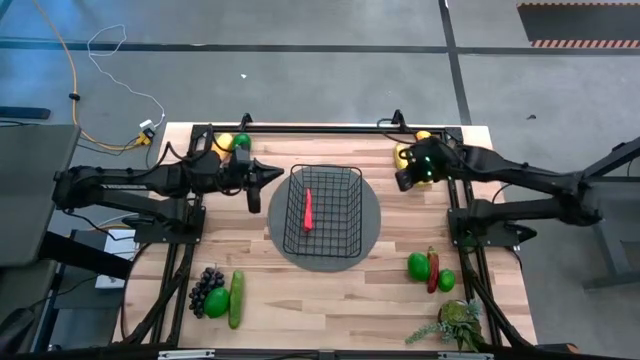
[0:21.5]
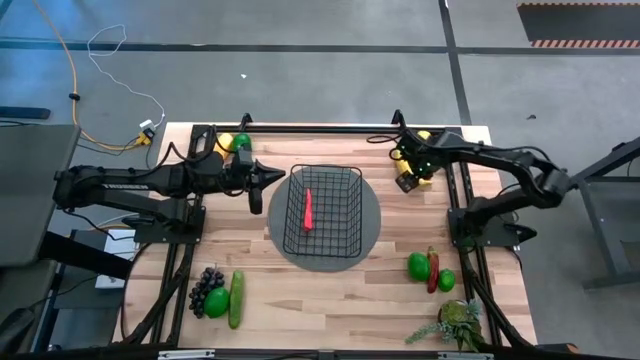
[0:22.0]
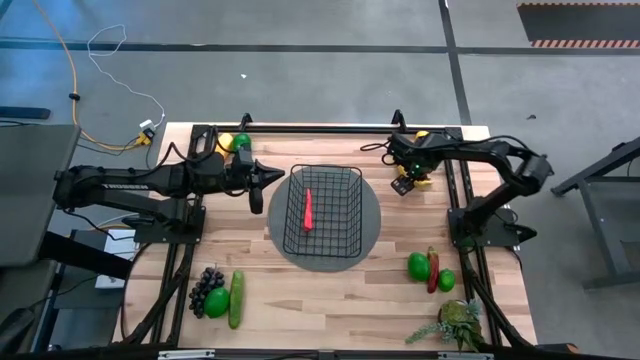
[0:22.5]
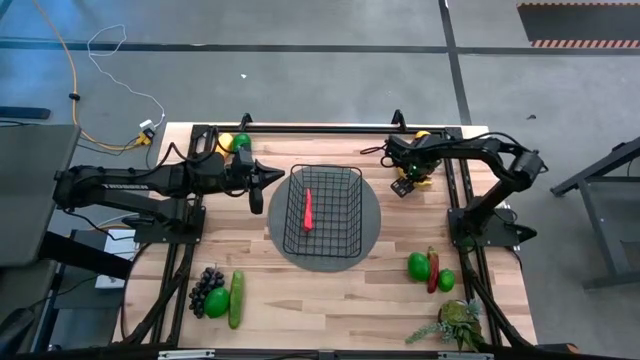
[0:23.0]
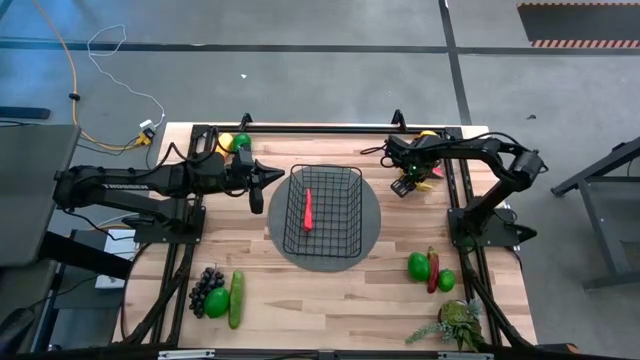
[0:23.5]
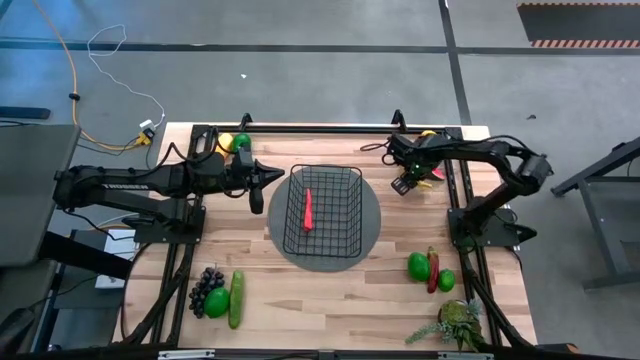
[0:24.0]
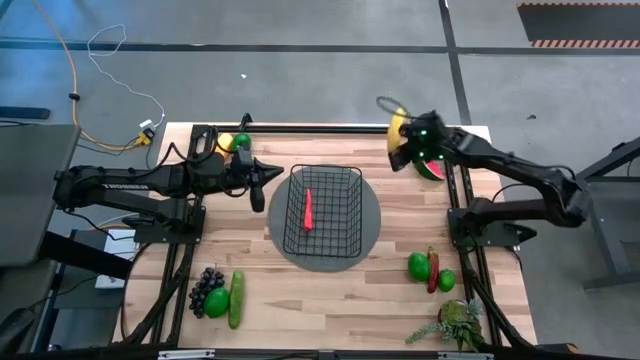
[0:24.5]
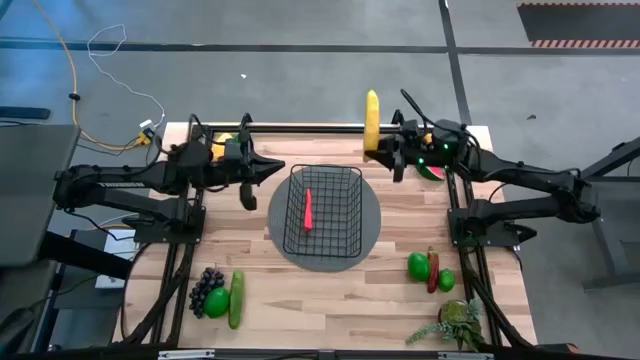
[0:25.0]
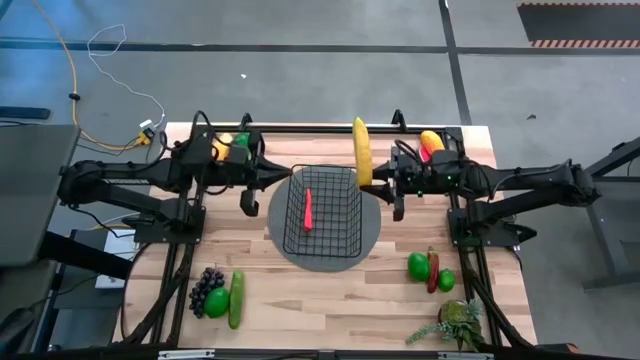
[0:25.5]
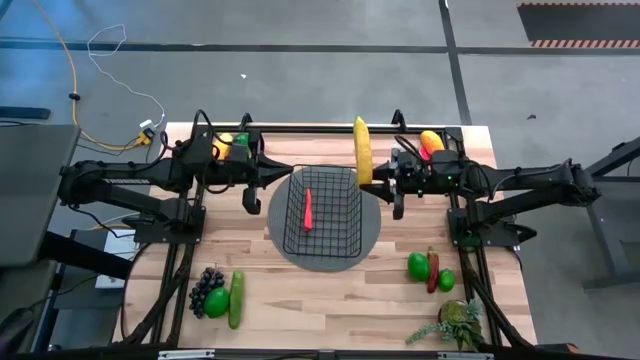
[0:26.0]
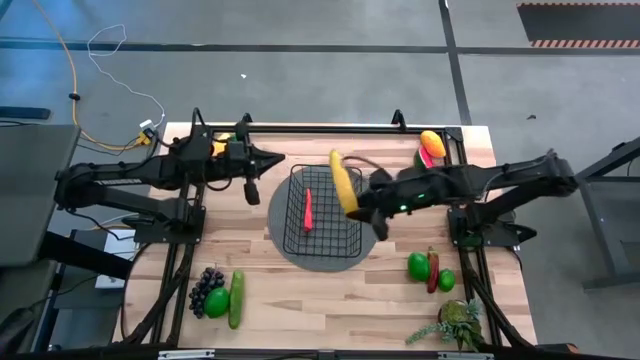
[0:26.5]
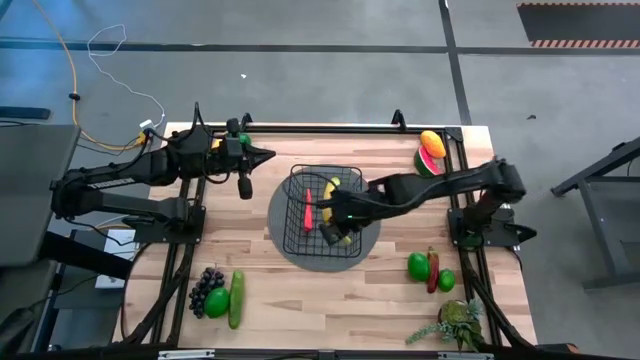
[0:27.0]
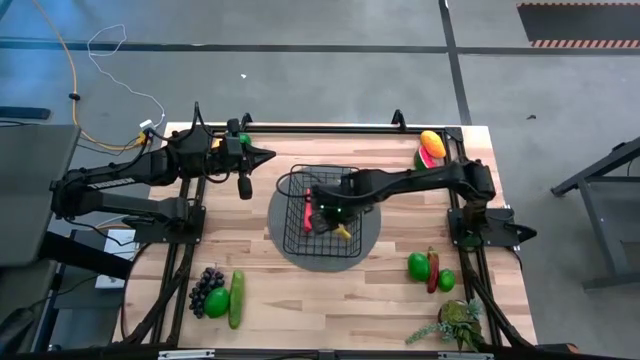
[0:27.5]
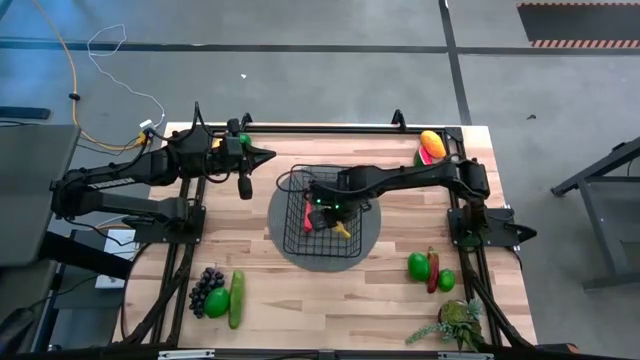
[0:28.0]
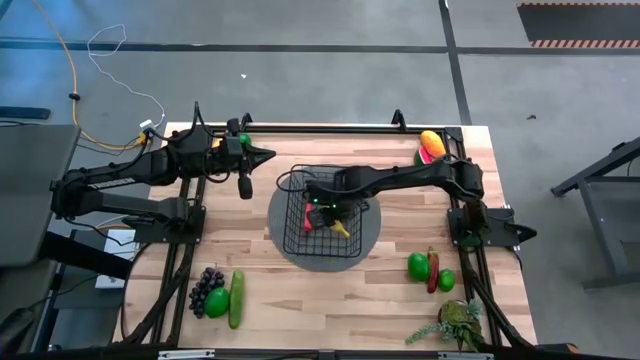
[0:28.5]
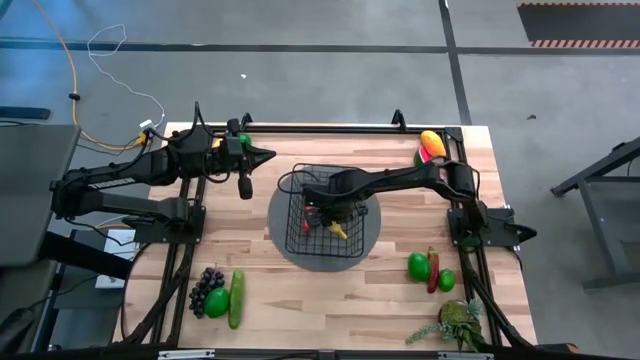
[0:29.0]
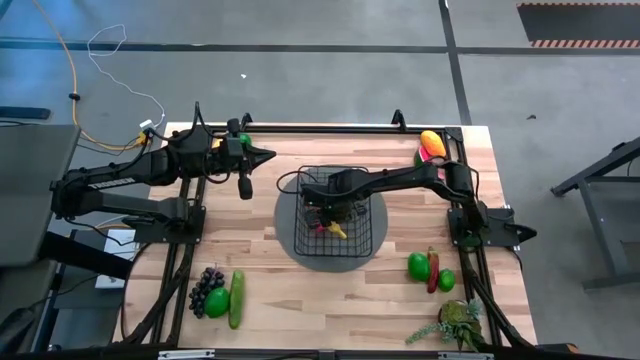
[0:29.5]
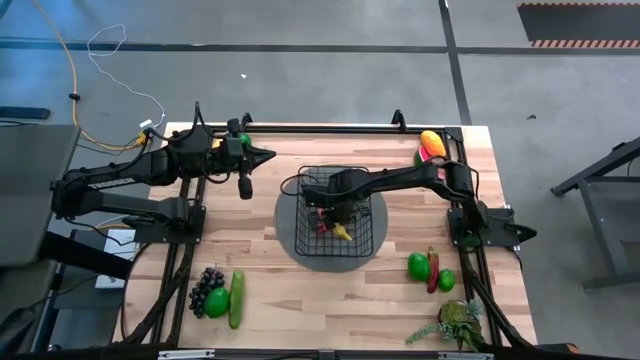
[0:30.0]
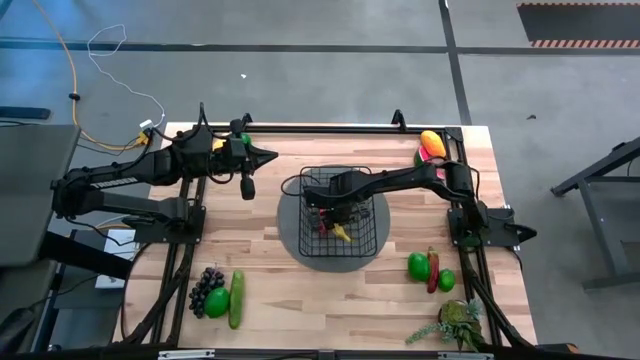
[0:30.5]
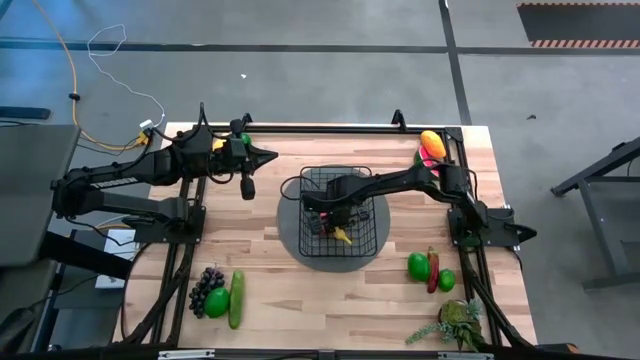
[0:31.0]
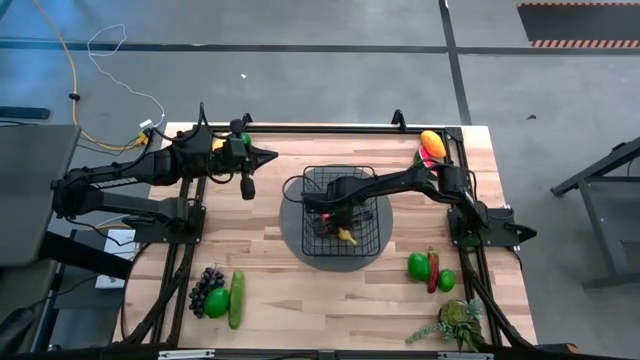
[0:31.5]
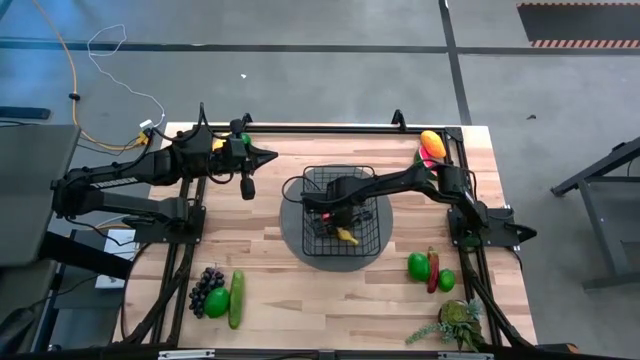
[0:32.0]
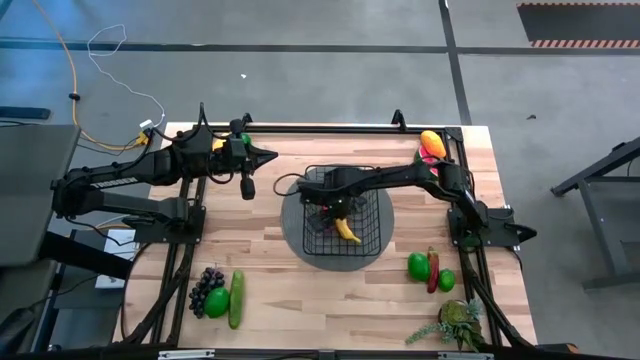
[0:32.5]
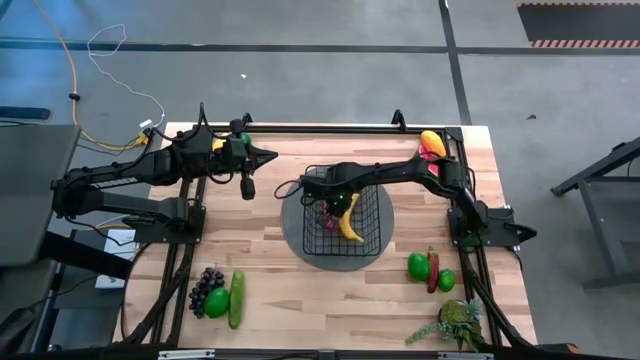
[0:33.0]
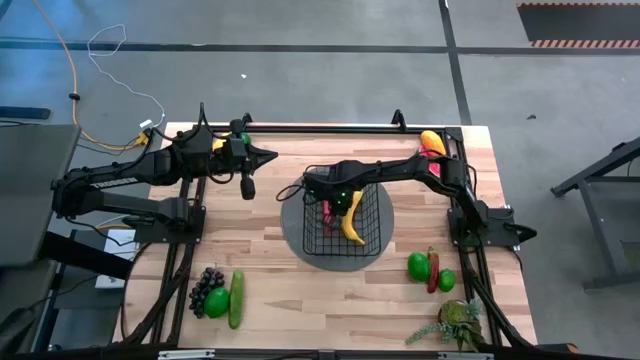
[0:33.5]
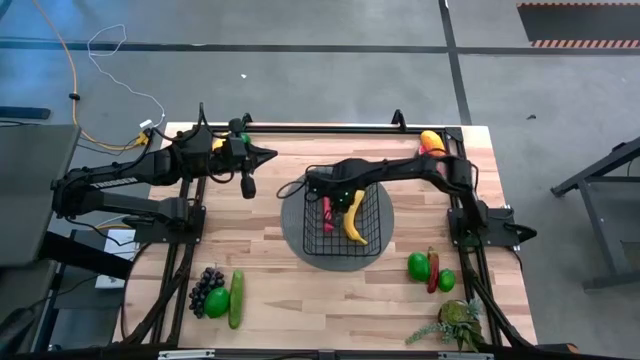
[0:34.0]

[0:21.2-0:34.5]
Task: Build produce basket
Put the yellow banana into the black wire basket

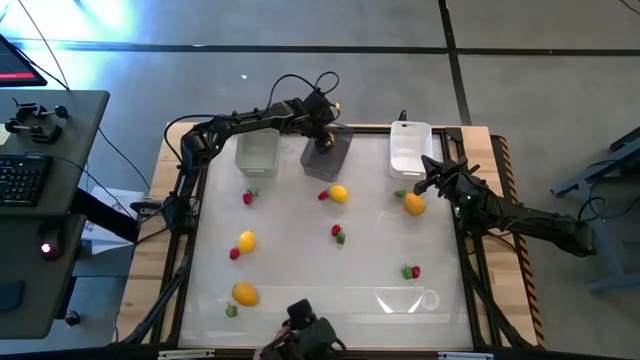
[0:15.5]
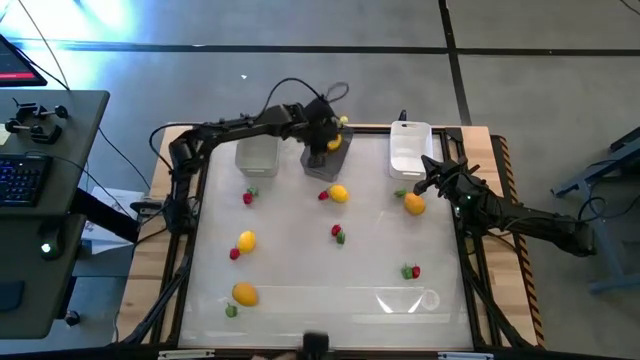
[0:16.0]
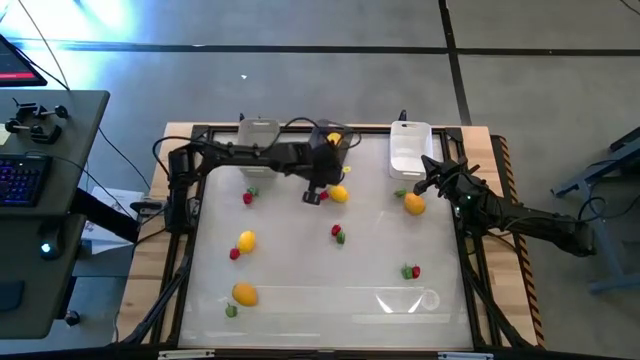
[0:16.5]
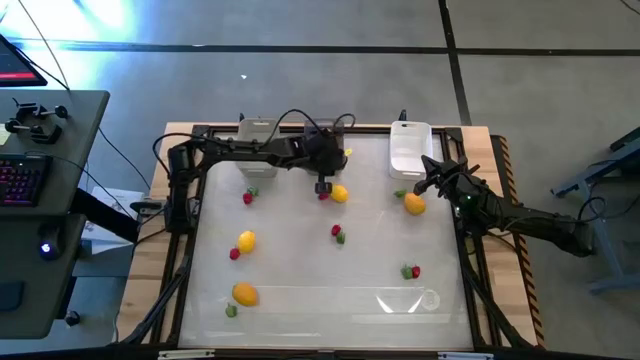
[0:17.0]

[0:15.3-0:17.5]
Task: Sort produce into baskets
Adjust the black bin

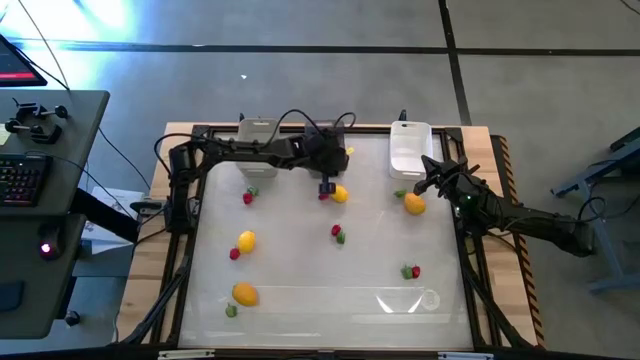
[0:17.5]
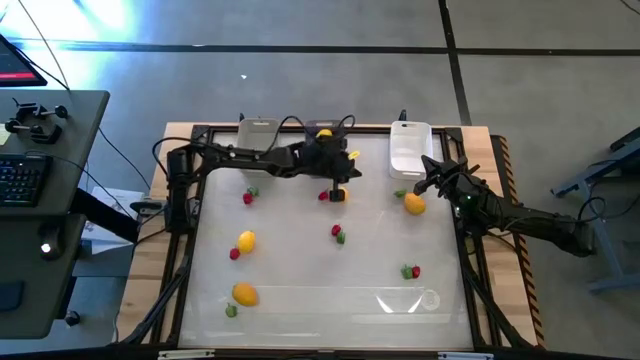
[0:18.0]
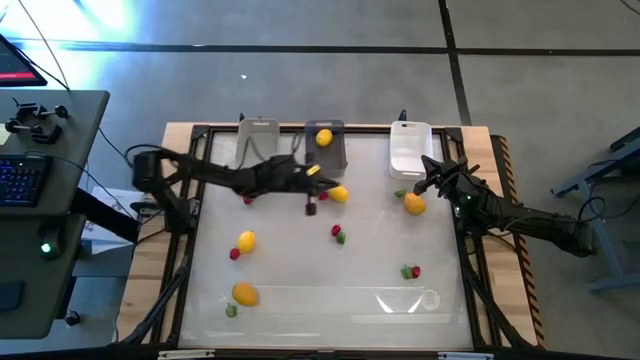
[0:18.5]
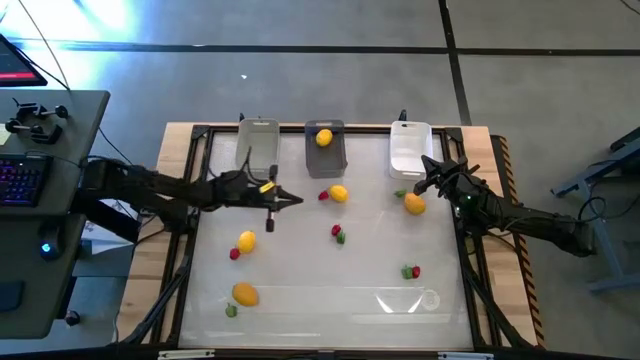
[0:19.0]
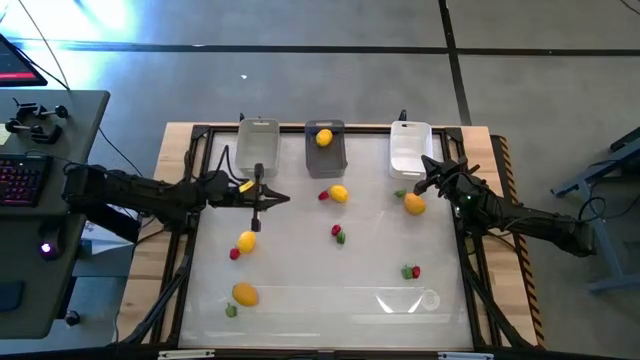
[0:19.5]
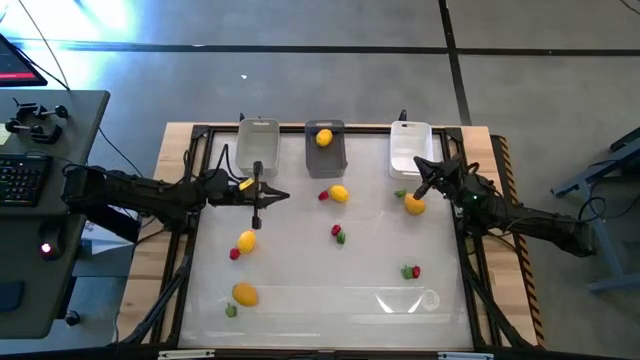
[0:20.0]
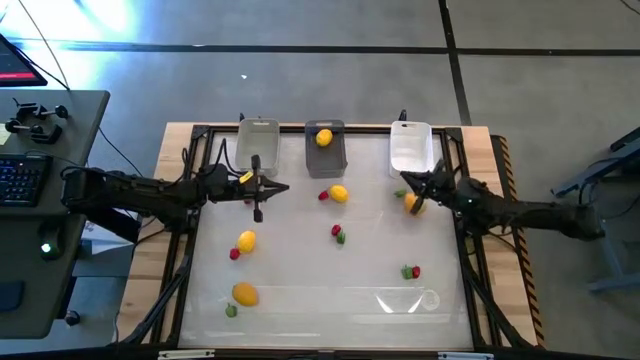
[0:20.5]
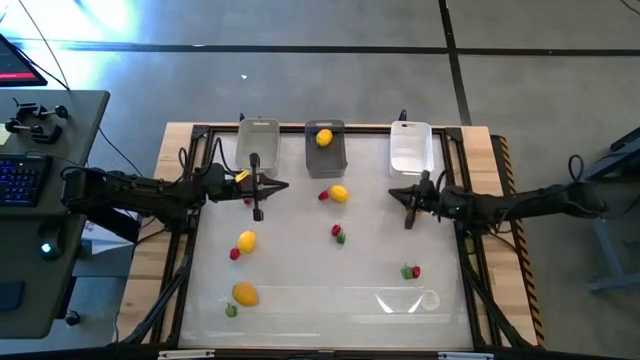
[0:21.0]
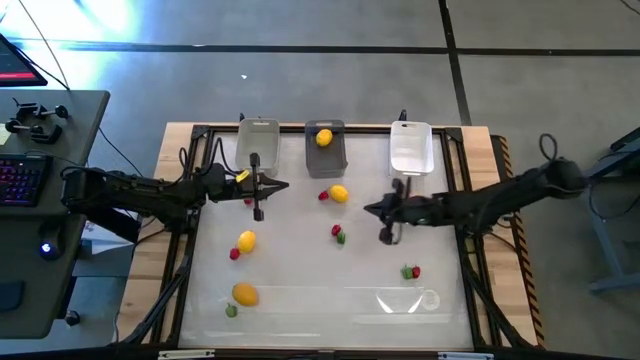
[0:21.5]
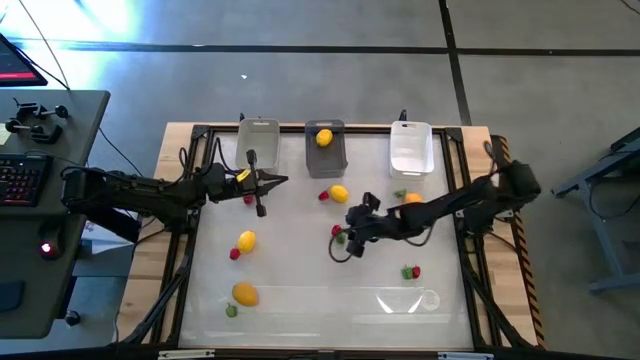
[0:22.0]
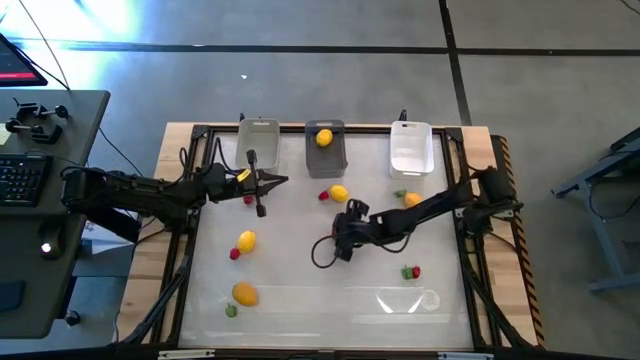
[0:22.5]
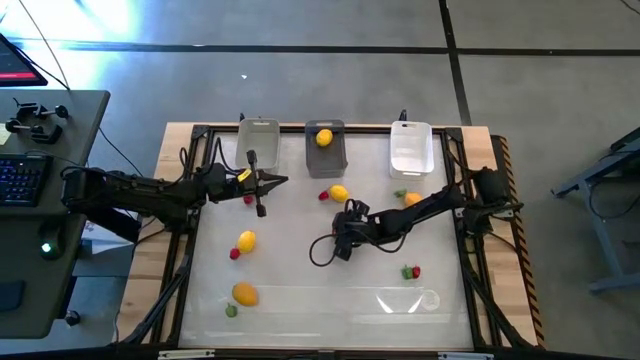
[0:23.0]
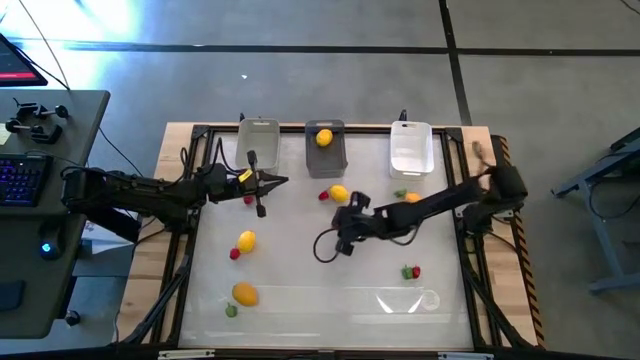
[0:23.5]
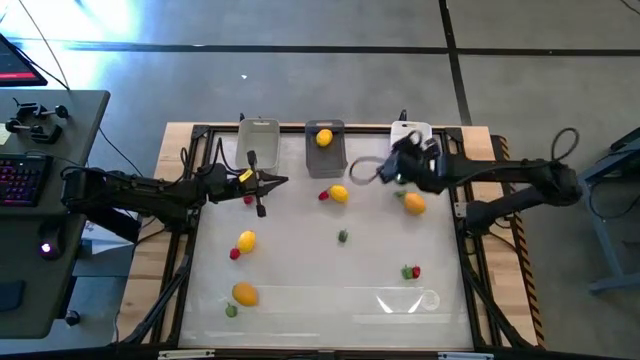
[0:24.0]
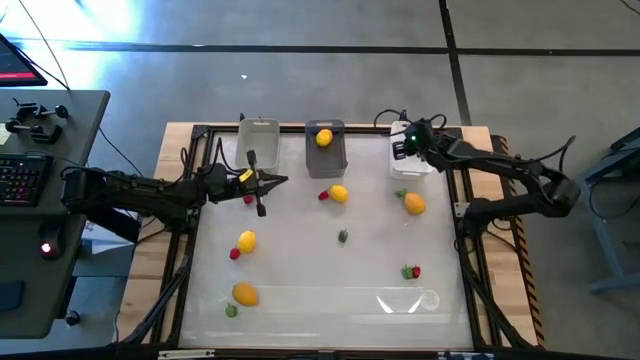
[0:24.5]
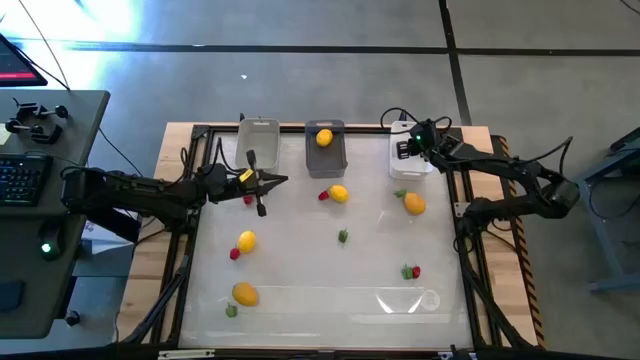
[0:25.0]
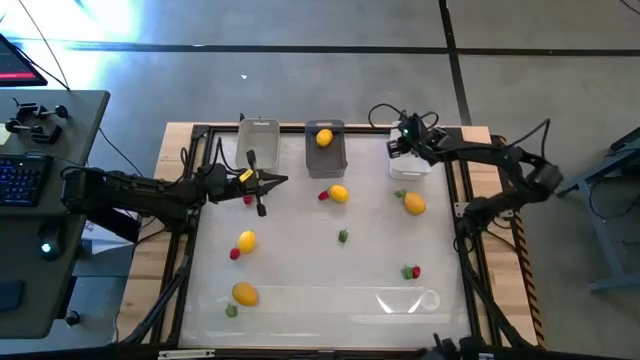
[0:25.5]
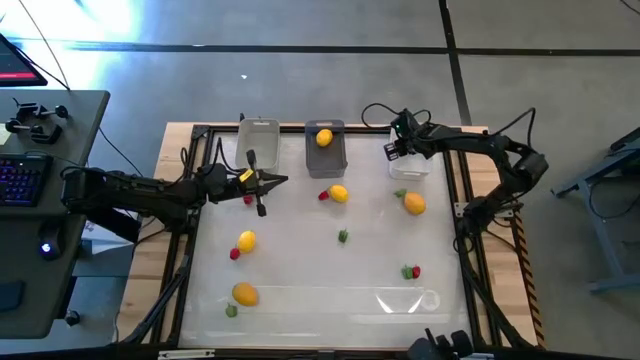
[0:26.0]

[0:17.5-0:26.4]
Put the center red bell pepper into the white bin
